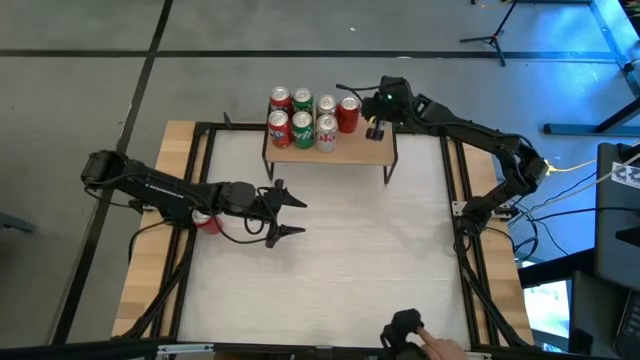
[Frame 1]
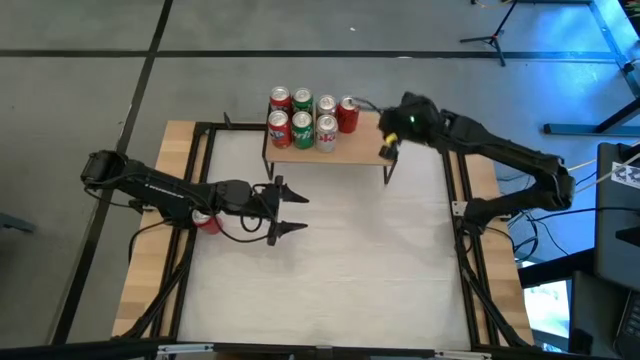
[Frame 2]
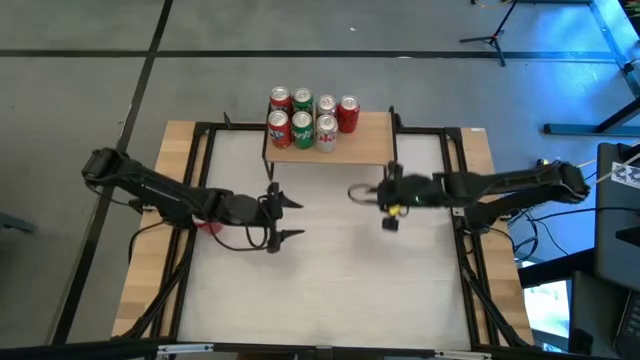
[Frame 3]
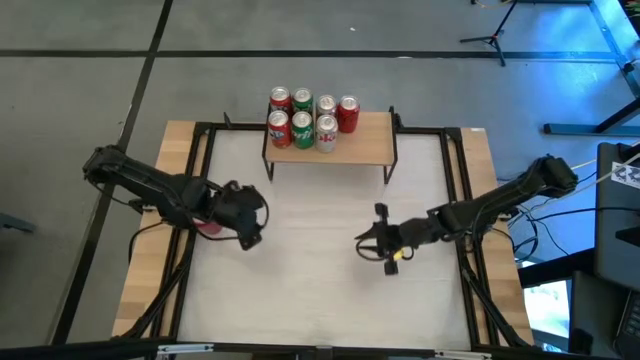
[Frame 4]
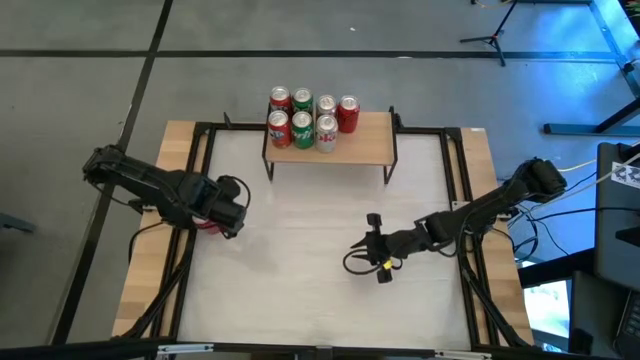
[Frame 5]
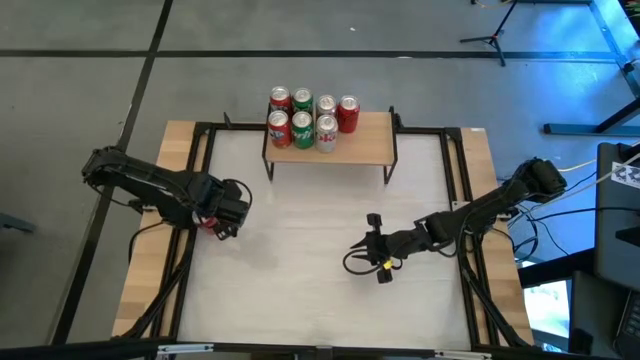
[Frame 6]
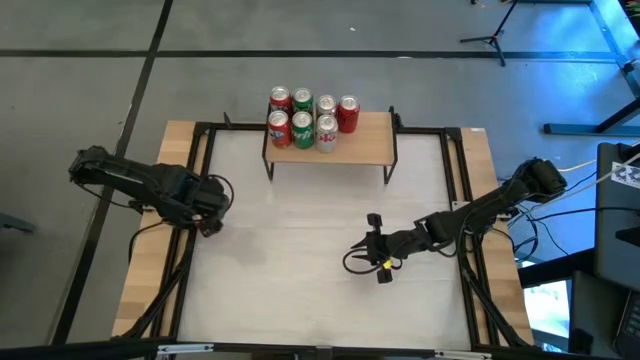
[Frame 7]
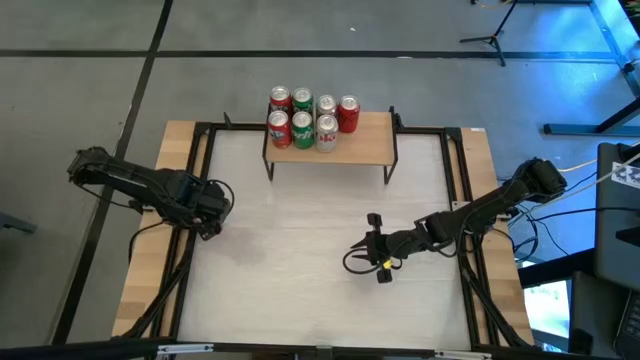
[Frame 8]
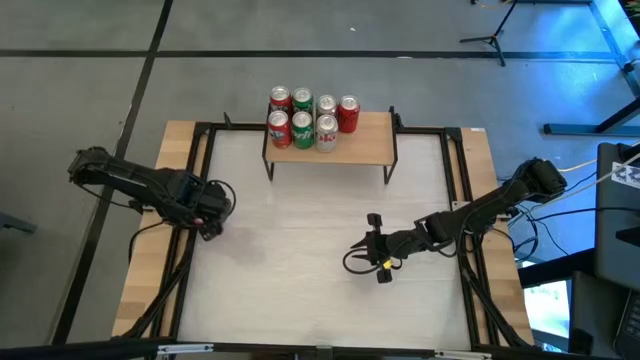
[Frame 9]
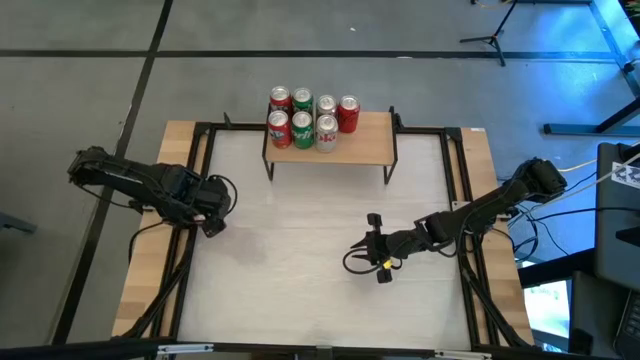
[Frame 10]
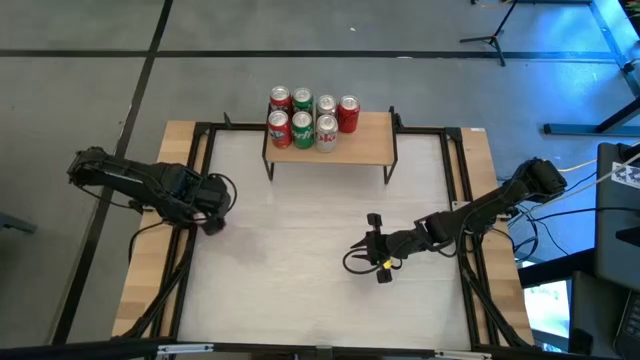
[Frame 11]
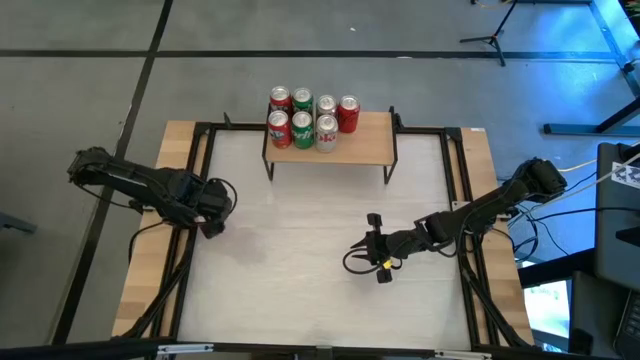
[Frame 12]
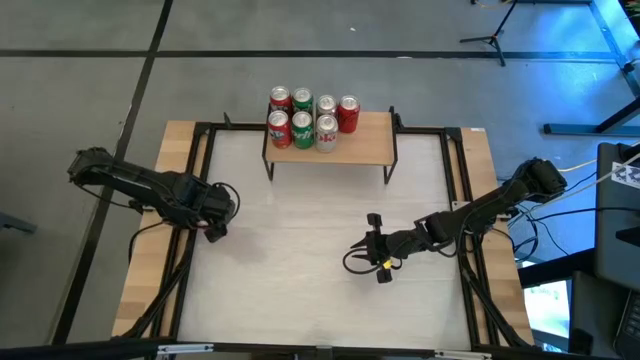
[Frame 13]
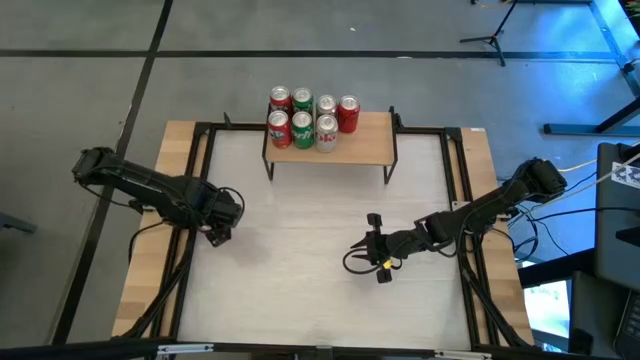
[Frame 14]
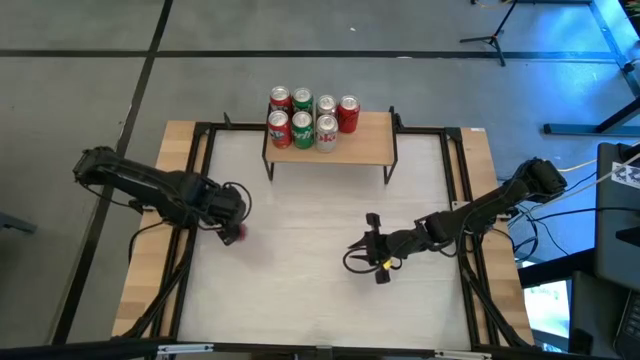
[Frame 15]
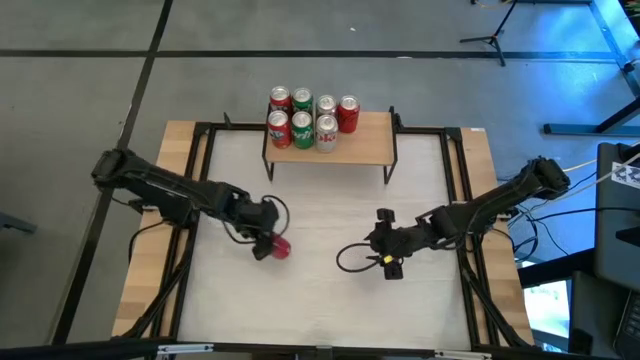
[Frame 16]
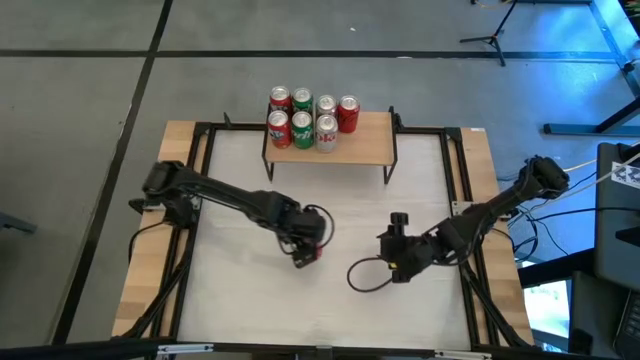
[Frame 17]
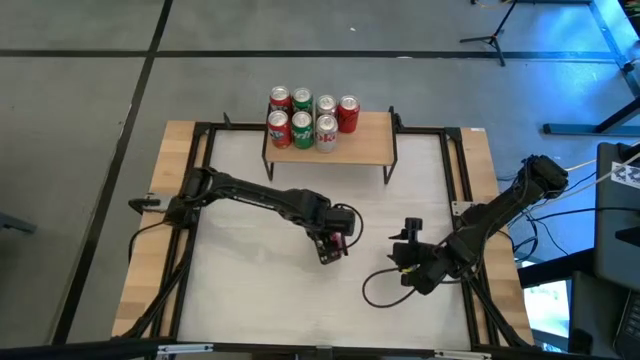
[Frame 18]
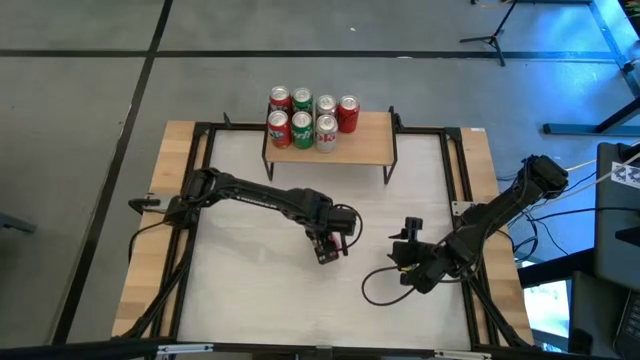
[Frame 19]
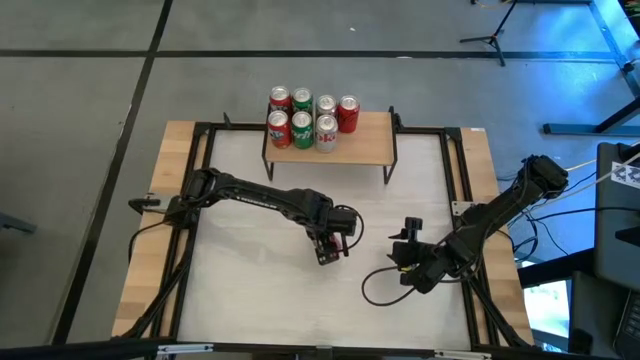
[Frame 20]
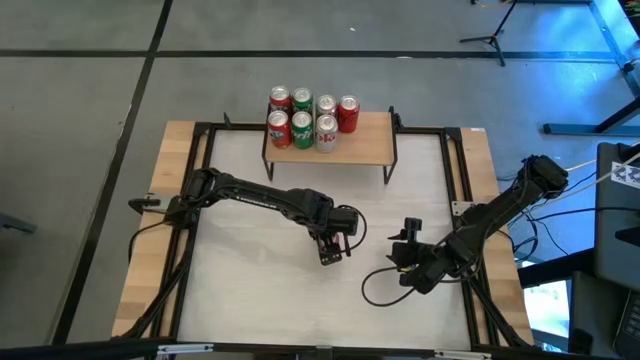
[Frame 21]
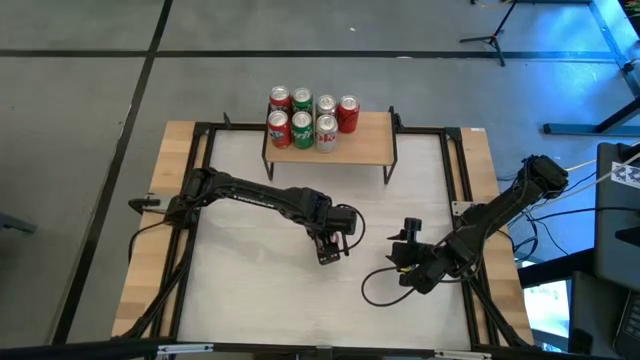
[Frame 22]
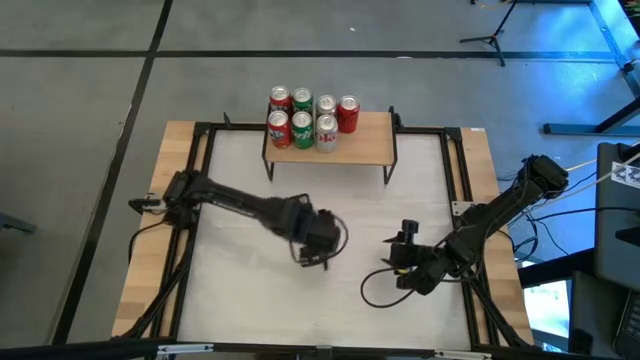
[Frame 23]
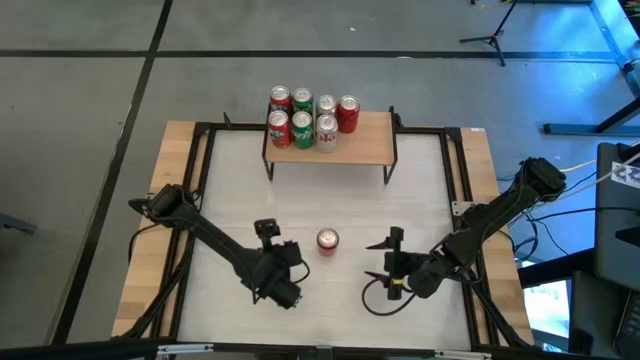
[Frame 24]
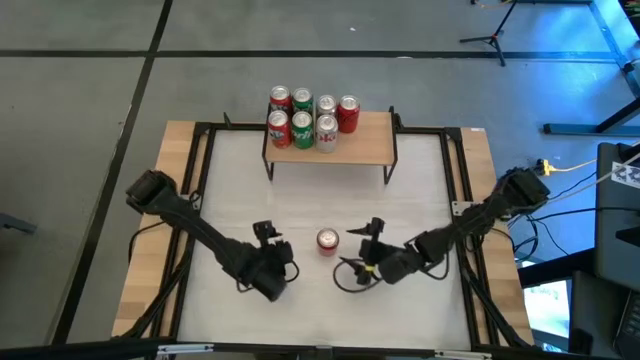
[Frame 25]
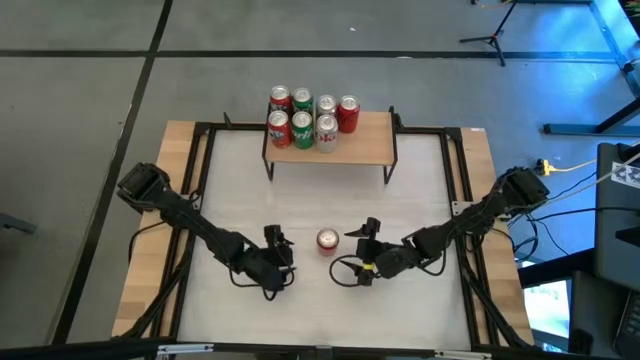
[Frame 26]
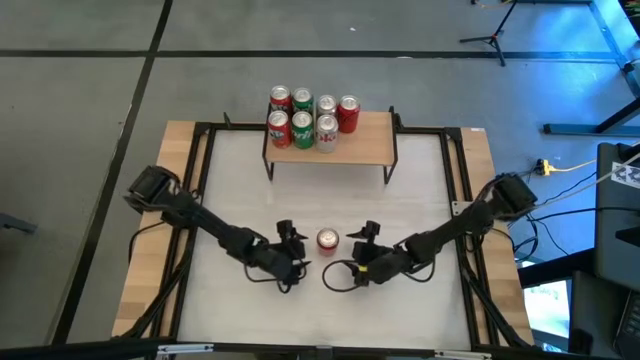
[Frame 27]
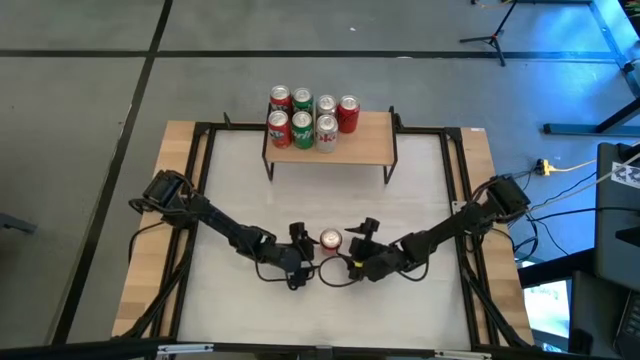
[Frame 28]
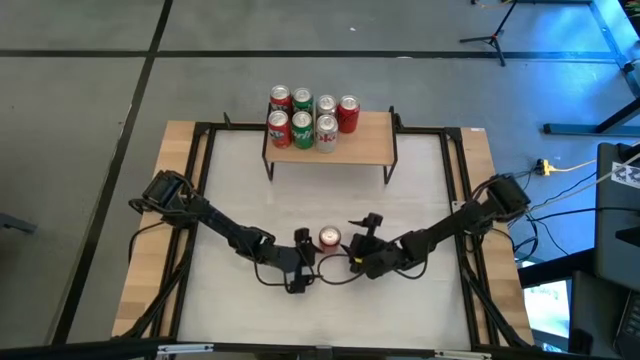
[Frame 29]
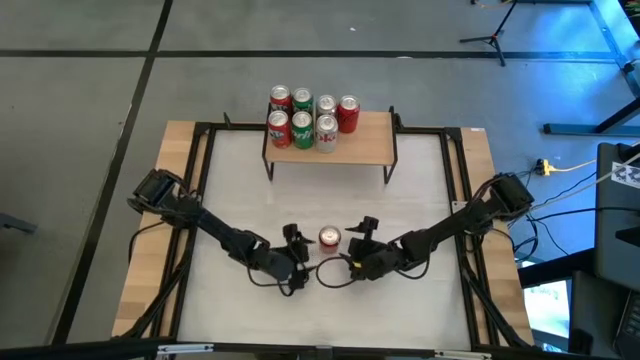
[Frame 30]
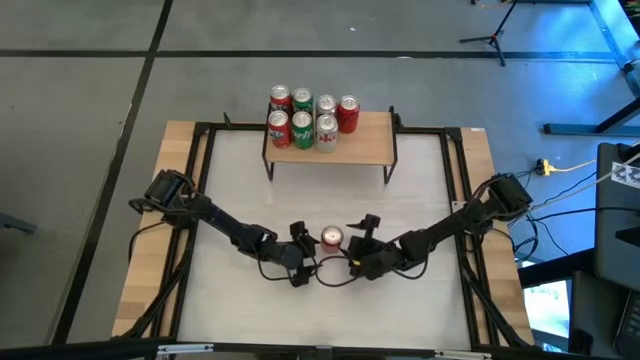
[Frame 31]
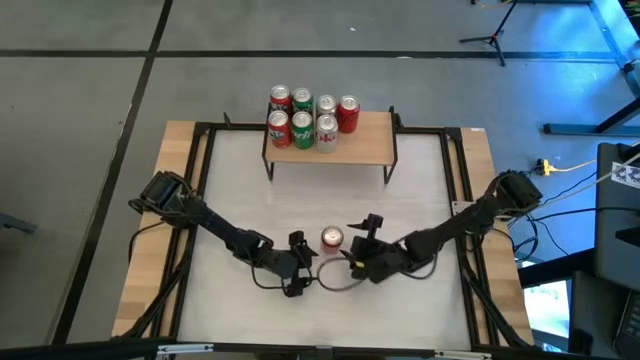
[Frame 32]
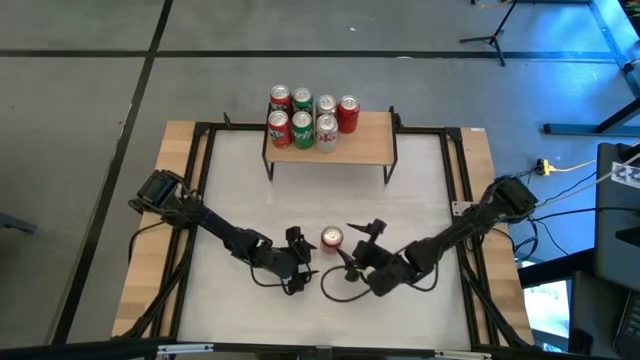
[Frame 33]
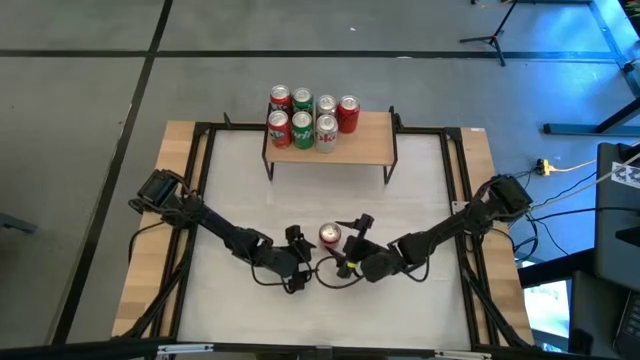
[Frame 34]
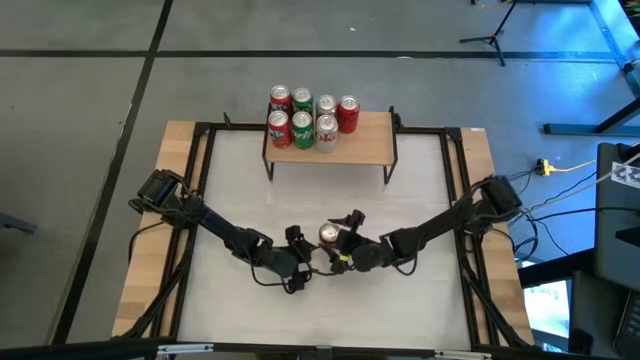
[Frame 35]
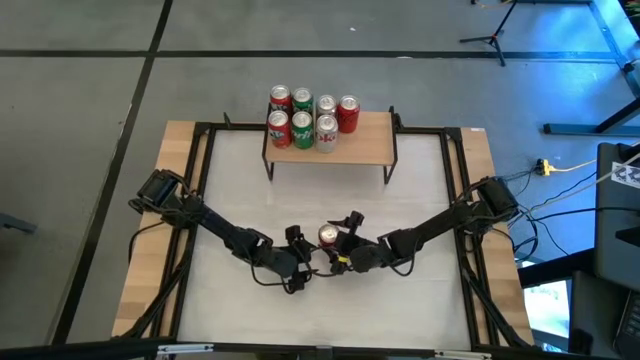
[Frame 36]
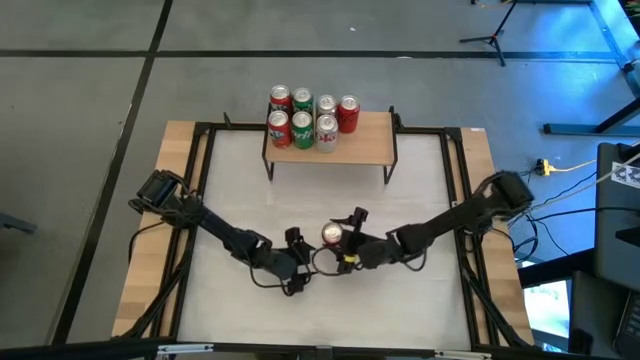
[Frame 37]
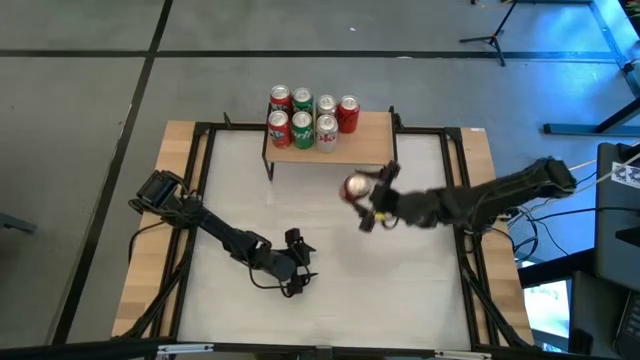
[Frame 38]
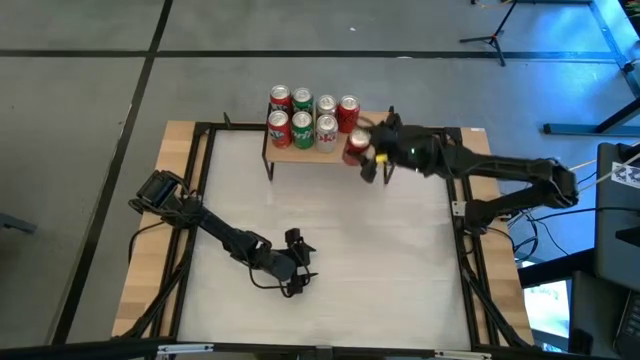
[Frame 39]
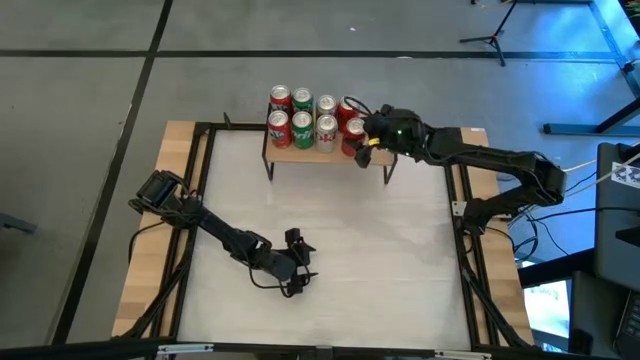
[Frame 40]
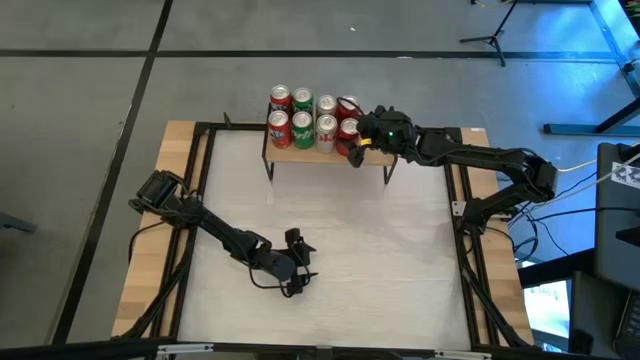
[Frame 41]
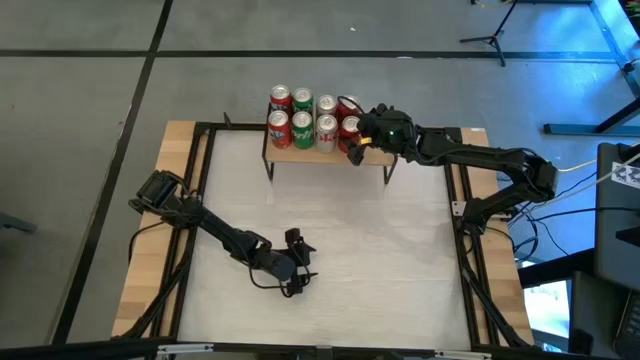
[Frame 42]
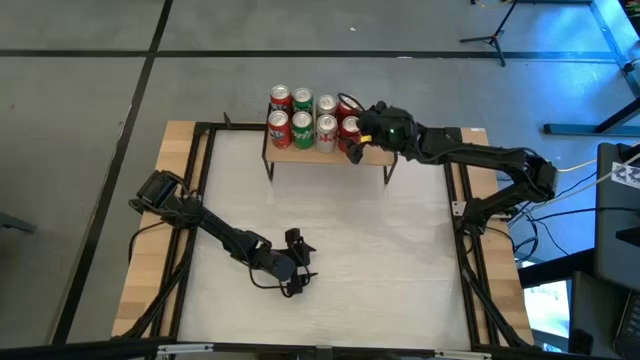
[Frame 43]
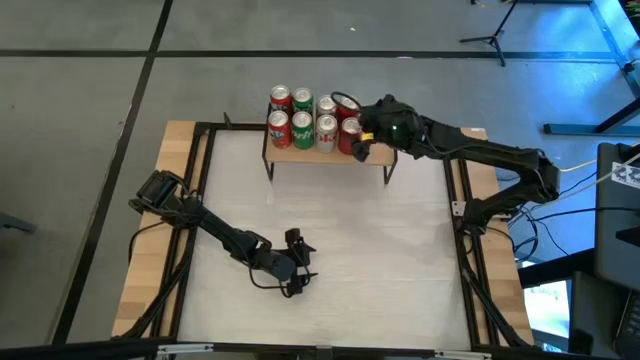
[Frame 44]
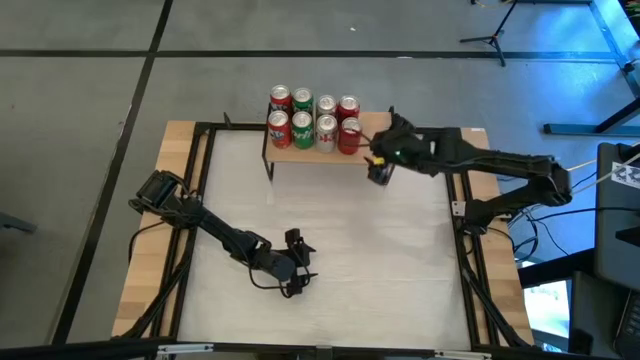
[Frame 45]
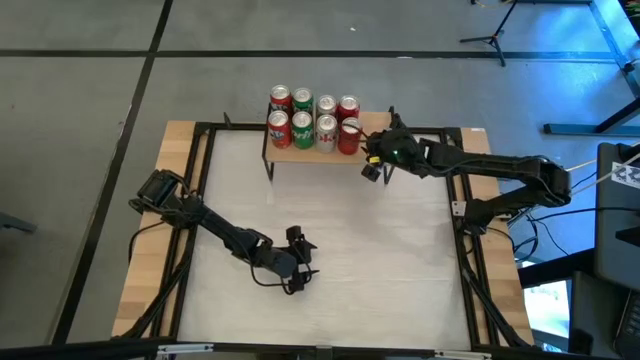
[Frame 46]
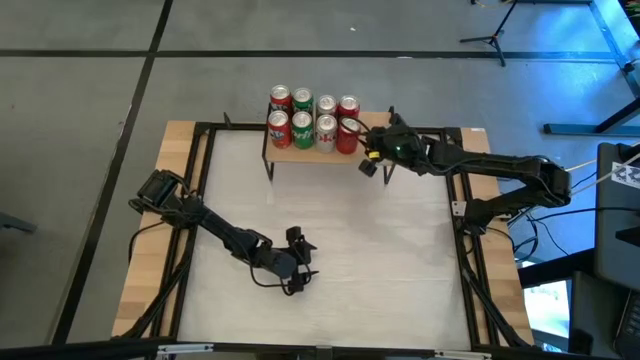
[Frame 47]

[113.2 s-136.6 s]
Task: Place canned beverage on shelf
Put the red black soda can aligned with the other red black soda can on the shelf
